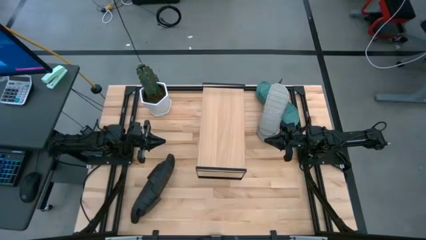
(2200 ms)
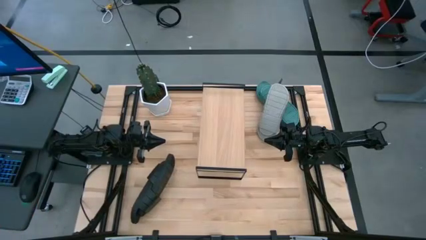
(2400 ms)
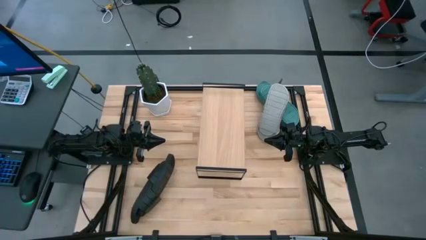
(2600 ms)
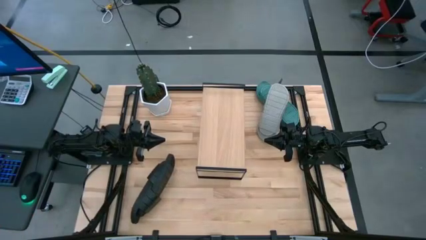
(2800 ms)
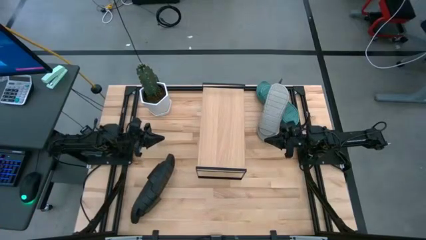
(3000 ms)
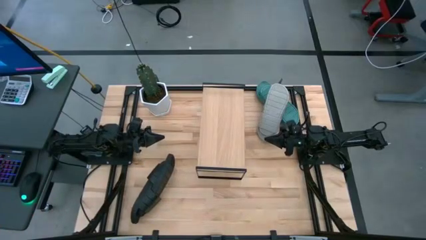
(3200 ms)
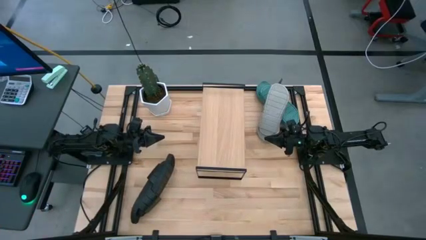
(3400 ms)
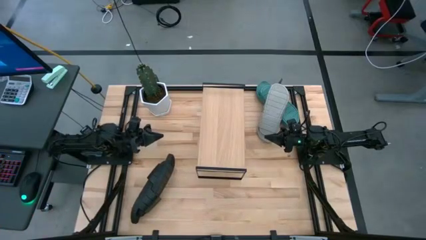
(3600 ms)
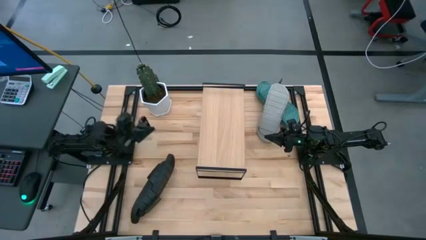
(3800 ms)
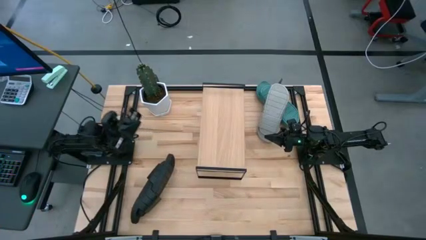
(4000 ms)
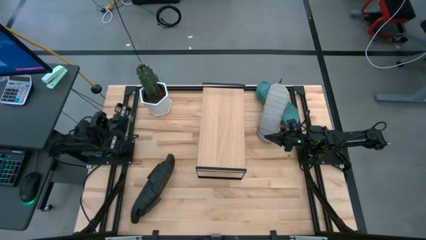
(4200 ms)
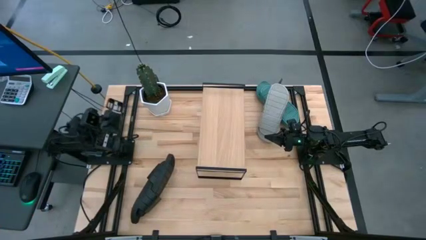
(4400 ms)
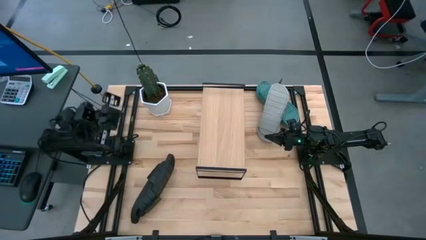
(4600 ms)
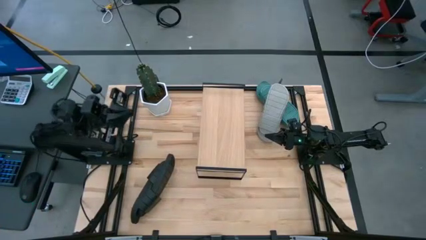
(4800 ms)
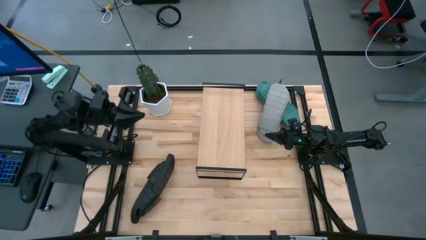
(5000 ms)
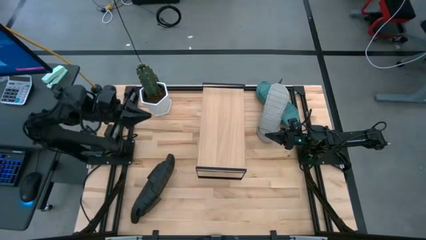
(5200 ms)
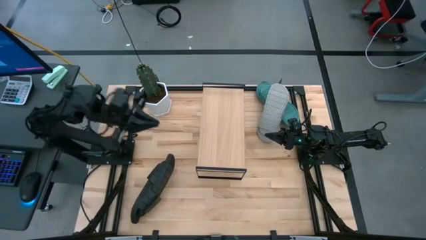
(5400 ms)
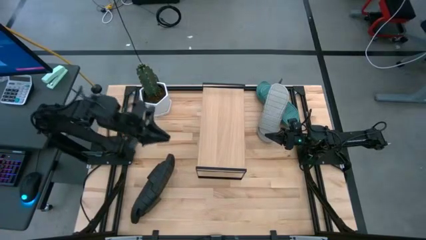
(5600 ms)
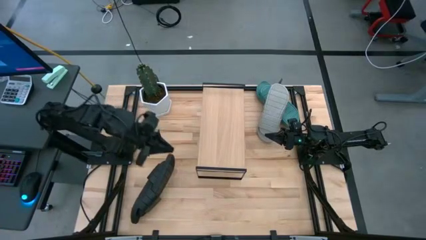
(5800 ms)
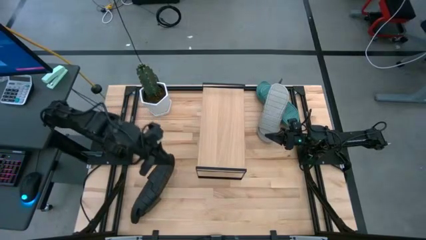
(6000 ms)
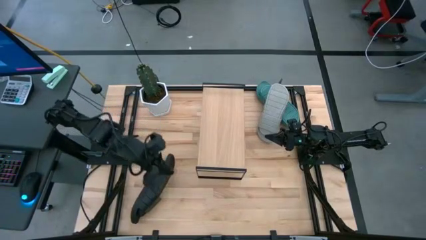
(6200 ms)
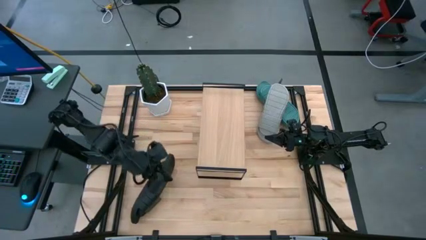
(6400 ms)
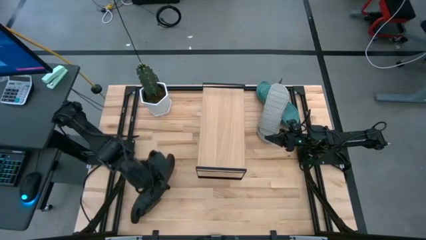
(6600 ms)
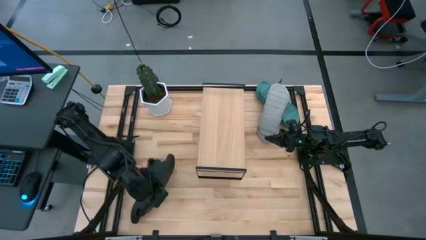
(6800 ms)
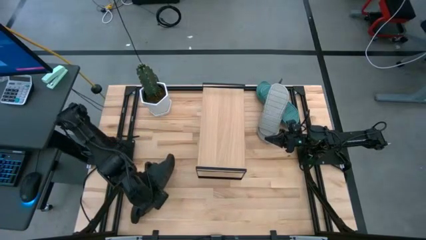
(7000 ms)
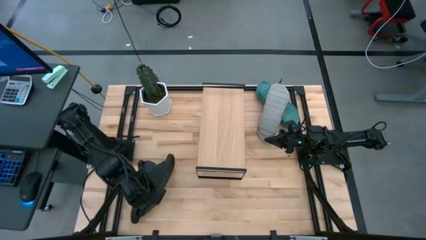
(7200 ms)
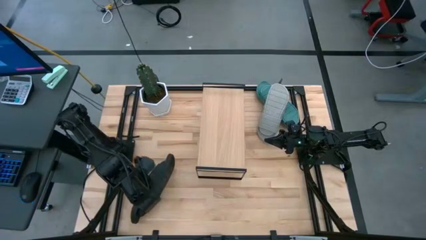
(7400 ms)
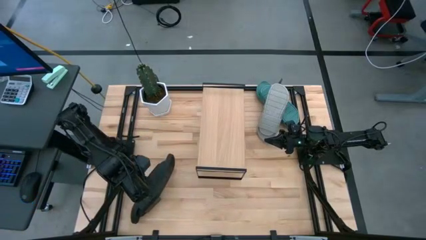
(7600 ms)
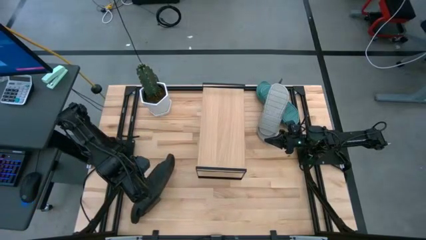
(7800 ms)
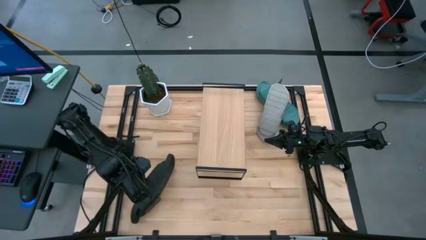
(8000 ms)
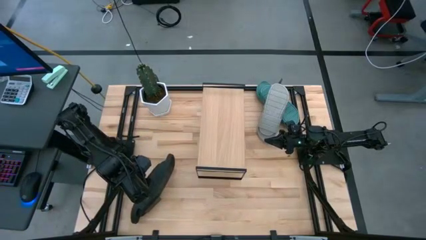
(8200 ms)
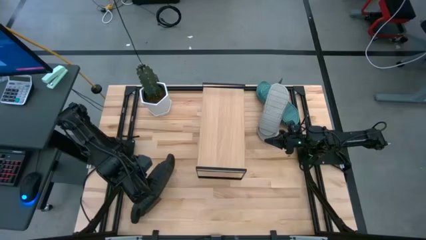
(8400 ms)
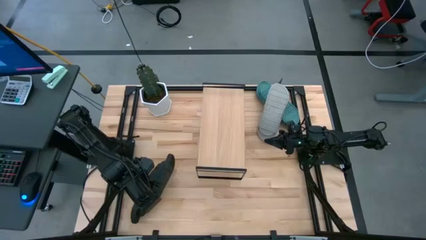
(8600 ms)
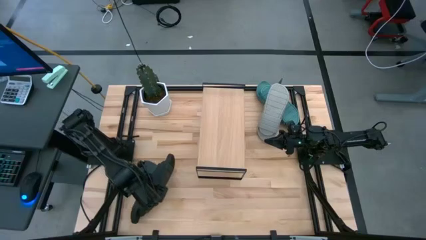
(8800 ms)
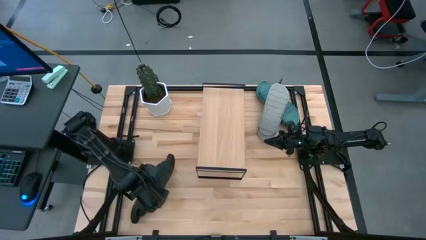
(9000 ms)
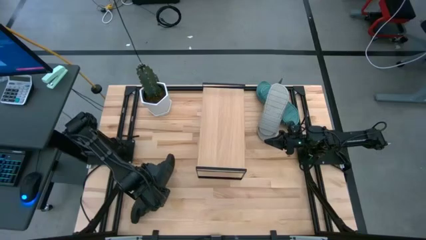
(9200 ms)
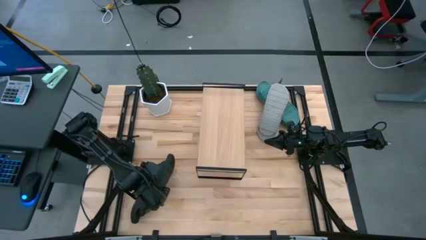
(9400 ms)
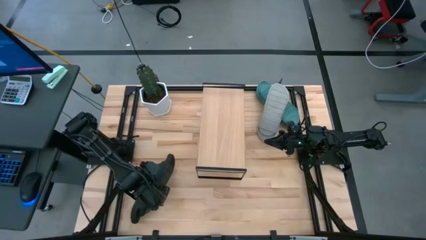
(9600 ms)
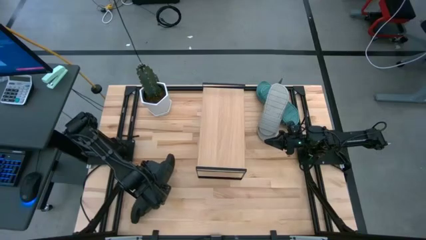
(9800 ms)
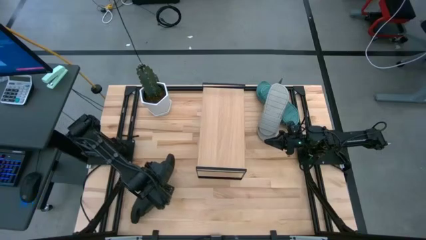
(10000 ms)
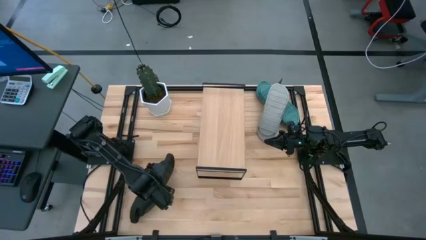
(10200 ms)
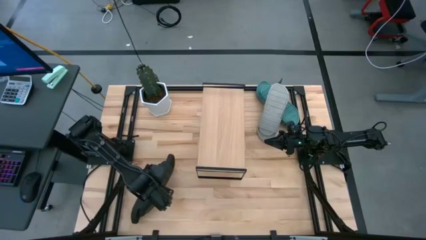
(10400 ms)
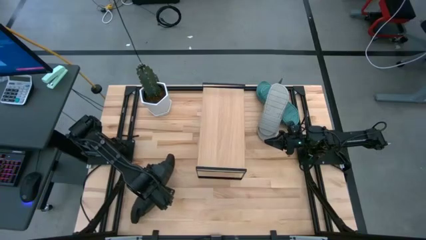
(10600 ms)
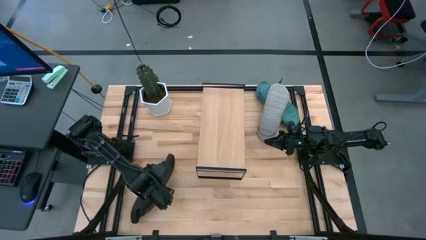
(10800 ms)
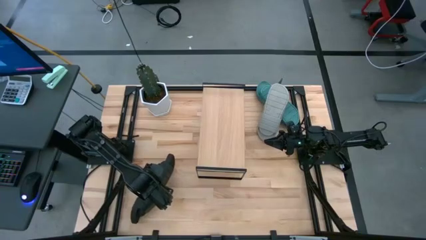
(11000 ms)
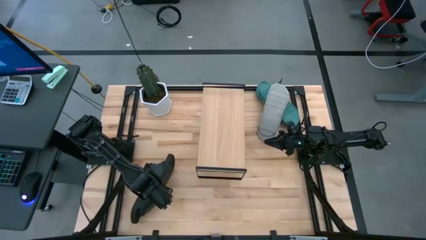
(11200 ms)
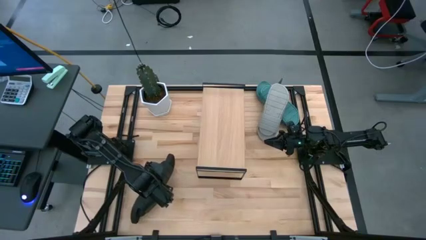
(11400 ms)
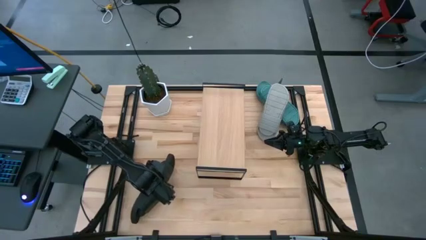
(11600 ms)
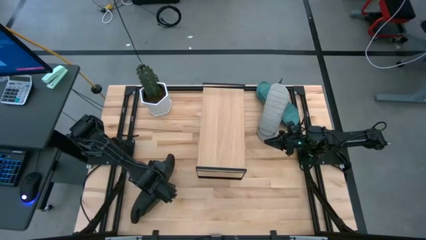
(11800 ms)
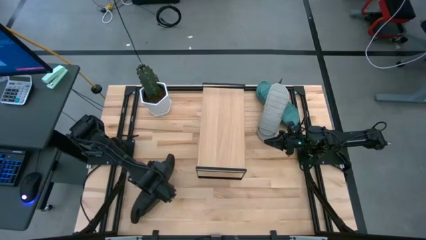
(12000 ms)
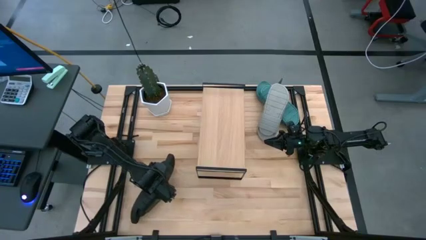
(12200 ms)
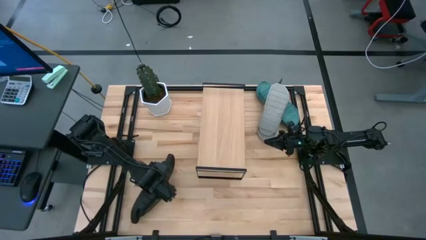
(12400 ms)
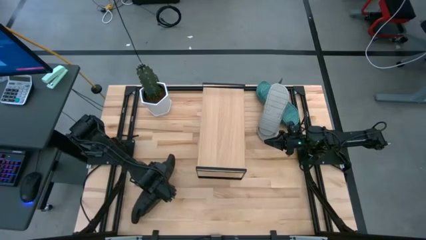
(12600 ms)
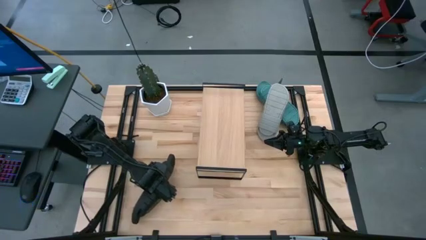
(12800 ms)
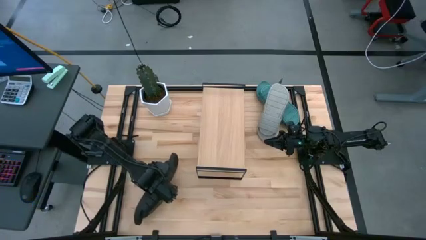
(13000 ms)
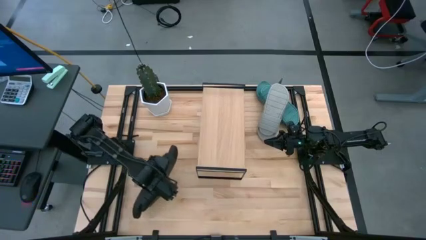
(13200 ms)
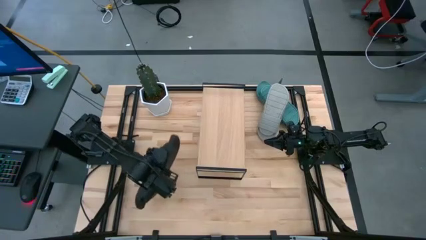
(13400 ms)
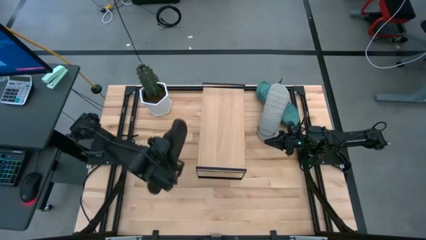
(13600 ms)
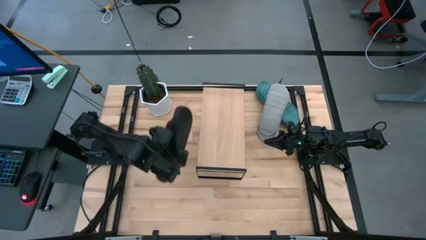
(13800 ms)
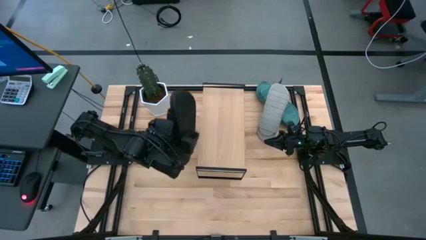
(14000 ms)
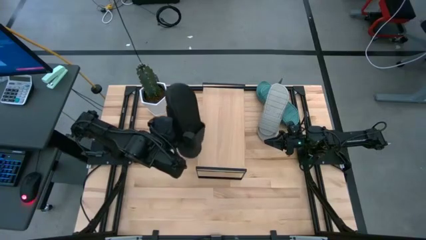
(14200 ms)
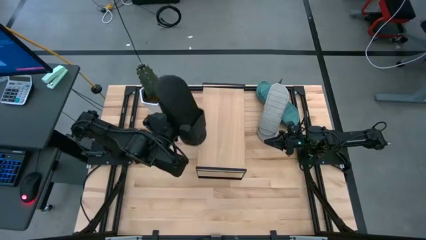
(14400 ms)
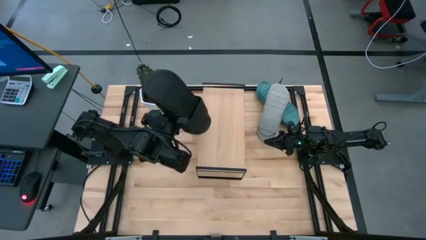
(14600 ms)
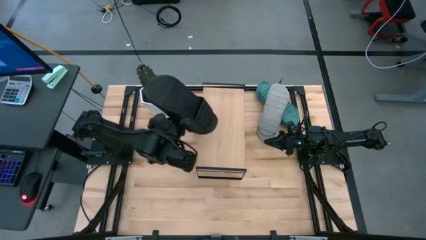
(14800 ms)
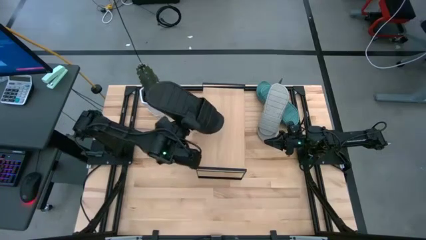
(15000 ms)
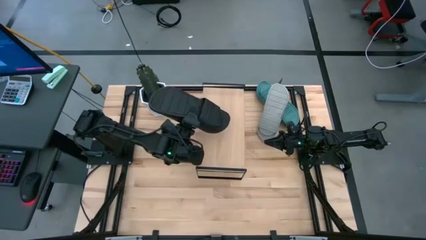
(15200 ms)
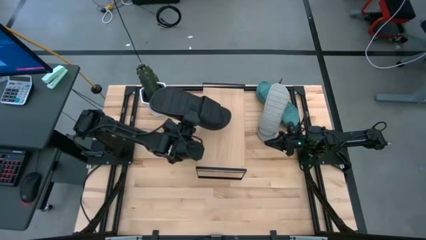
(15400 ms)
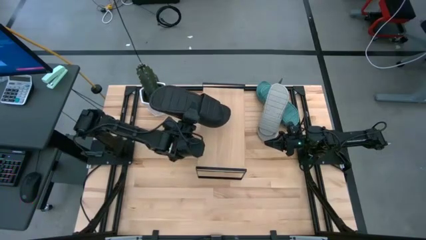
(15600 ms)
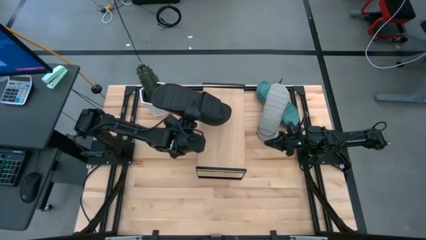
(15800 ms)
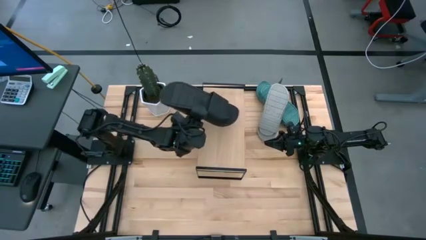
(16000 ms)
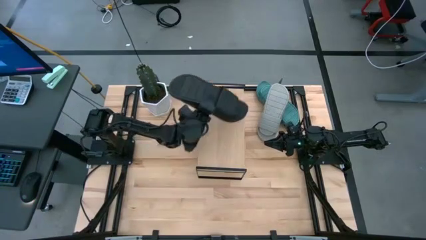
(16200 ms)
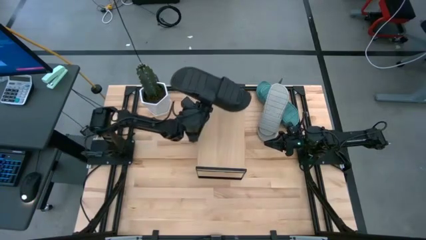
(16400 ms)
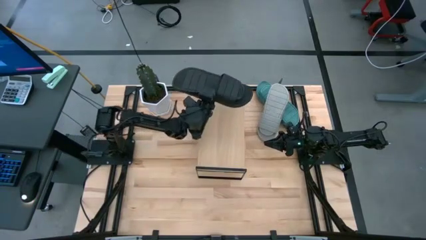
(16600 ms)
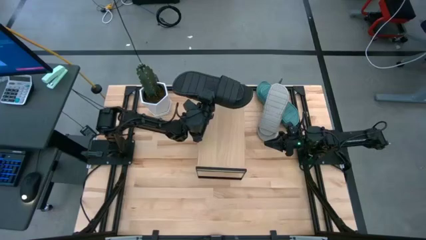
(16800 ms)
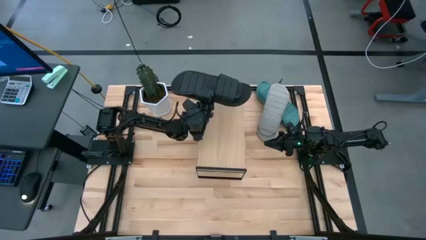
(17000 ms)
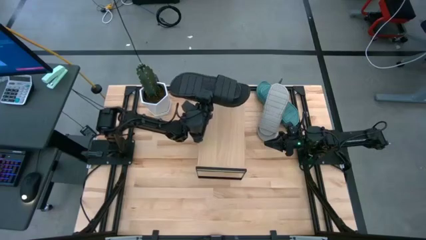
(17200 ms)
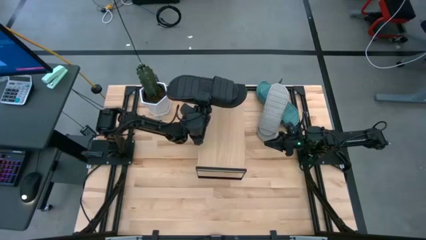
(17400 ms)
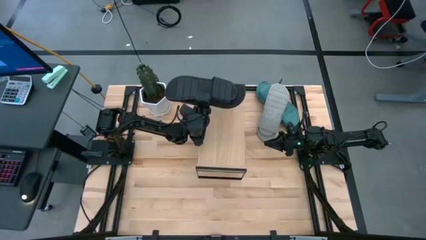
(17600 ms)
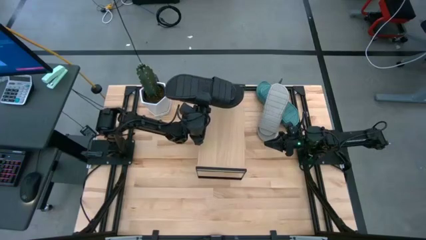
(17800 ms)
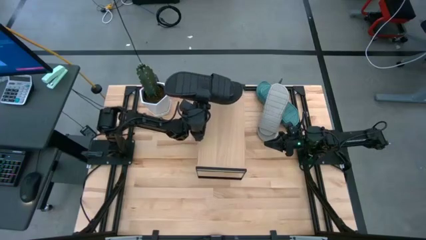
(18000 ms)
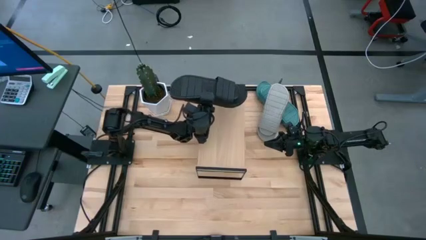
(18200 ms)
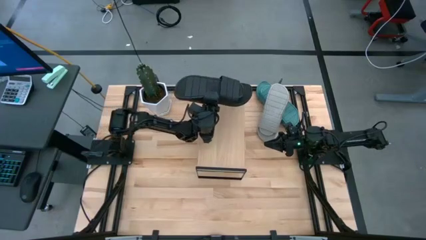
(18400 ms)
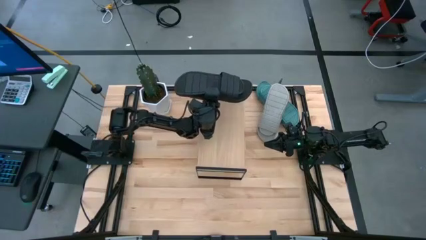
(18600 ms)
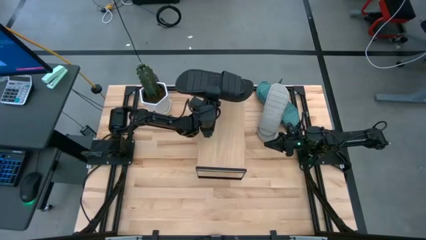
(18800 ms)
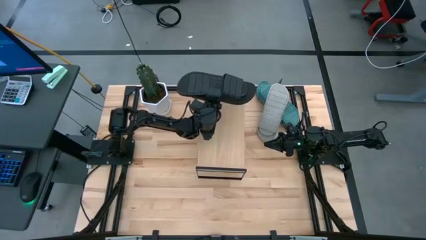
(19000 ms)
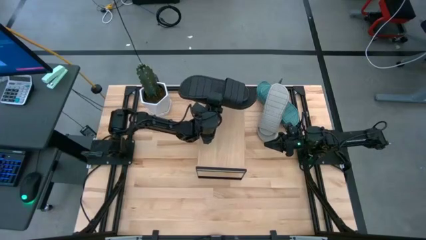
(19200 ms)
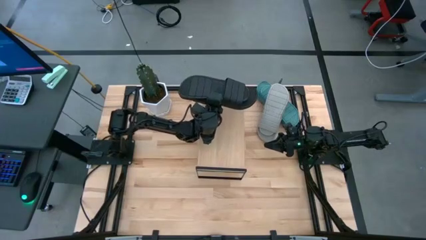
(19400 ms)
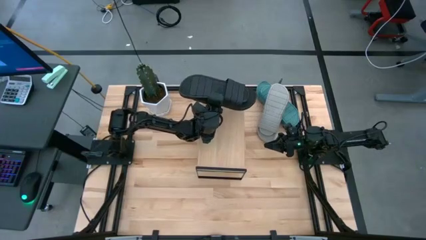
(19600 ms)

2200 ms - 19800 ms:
Task: Pick and place slides into the shelf
Put the black slides on the shelf
